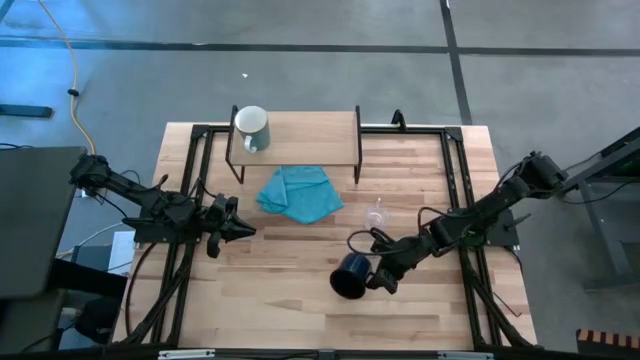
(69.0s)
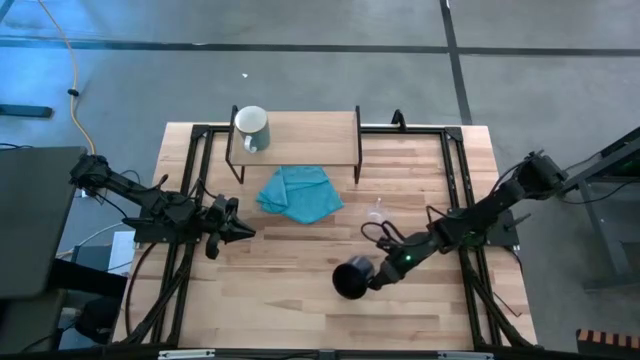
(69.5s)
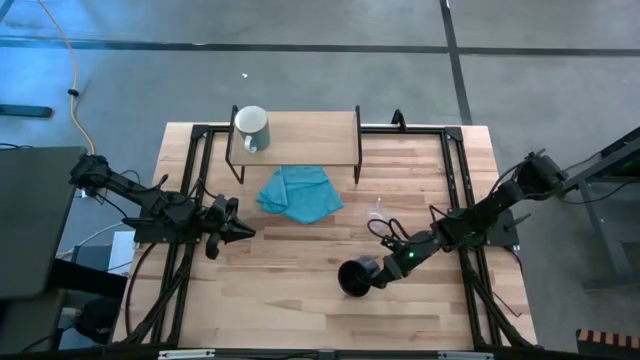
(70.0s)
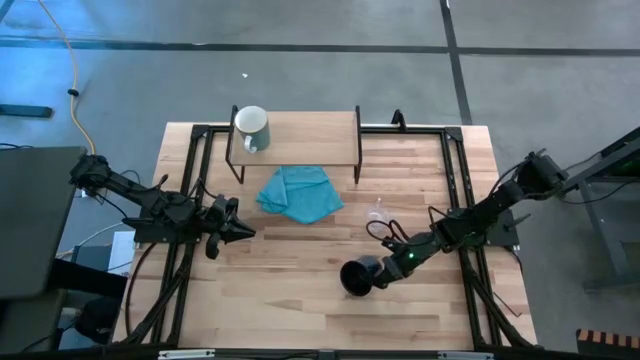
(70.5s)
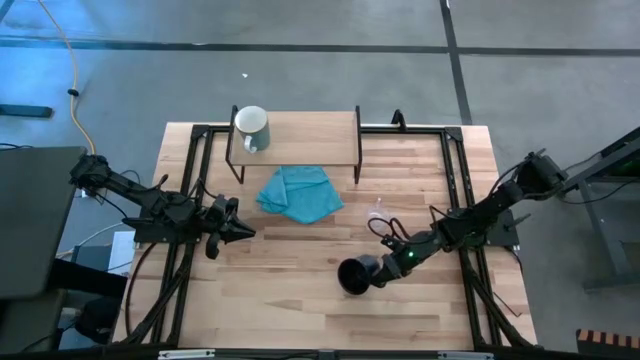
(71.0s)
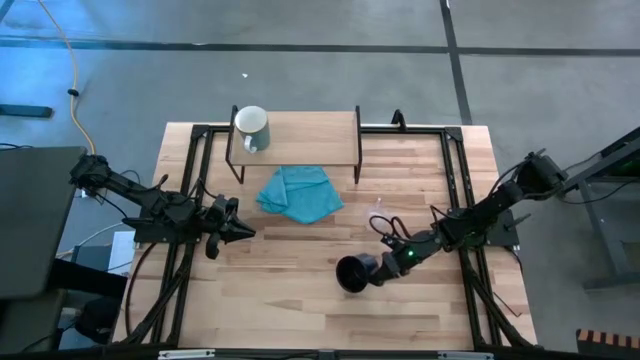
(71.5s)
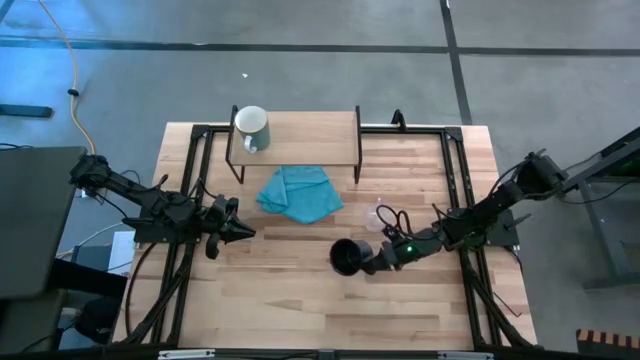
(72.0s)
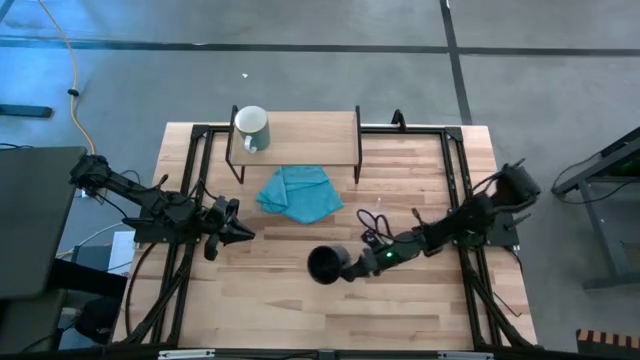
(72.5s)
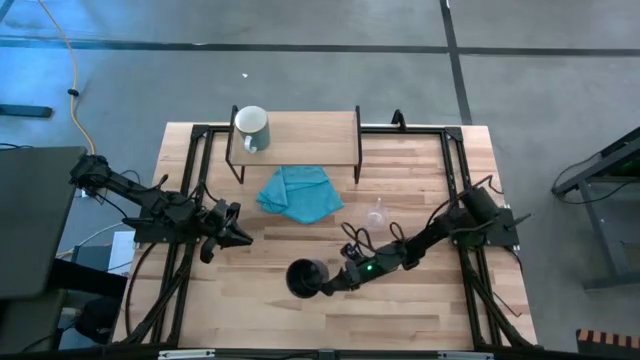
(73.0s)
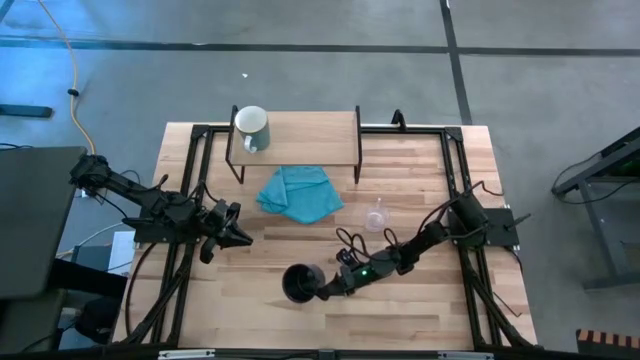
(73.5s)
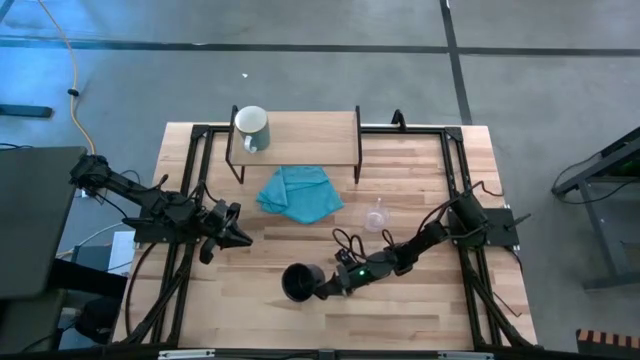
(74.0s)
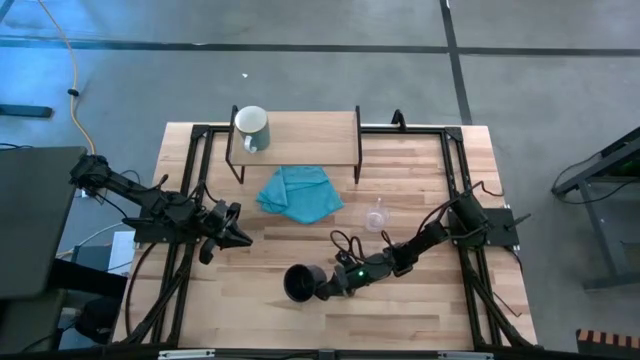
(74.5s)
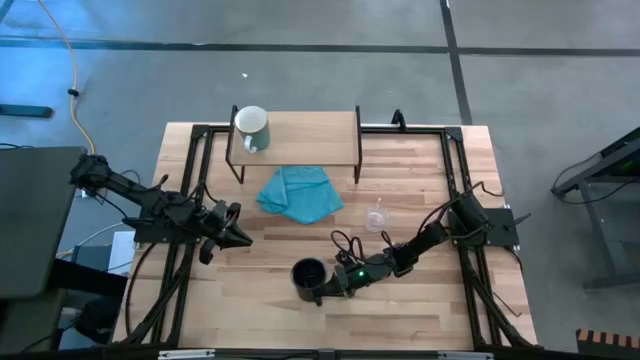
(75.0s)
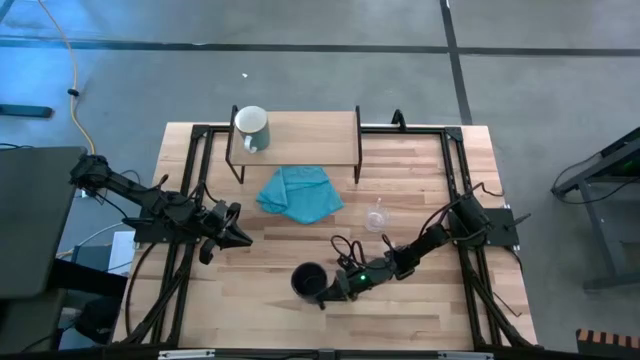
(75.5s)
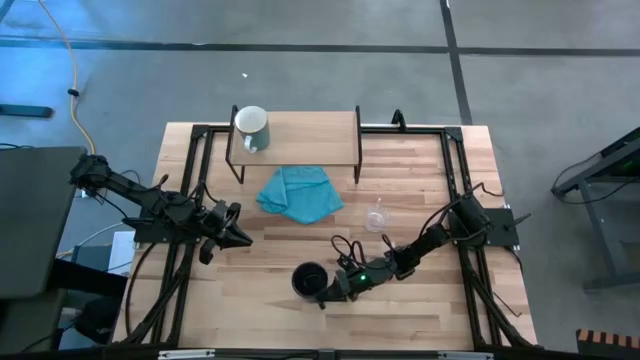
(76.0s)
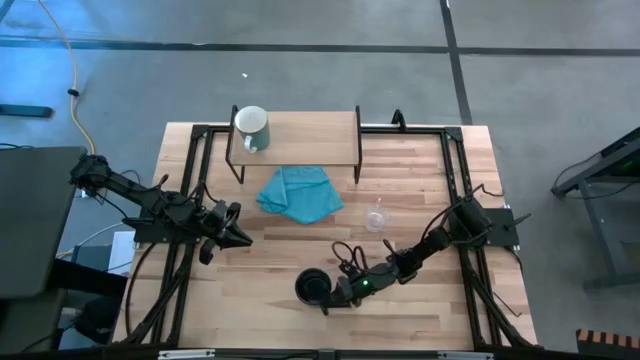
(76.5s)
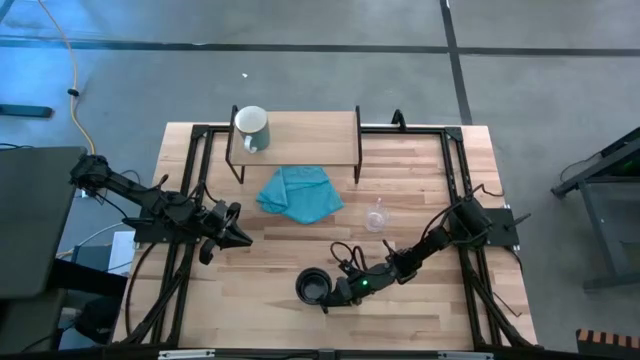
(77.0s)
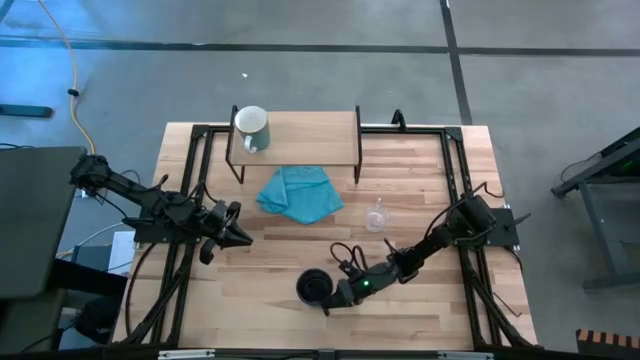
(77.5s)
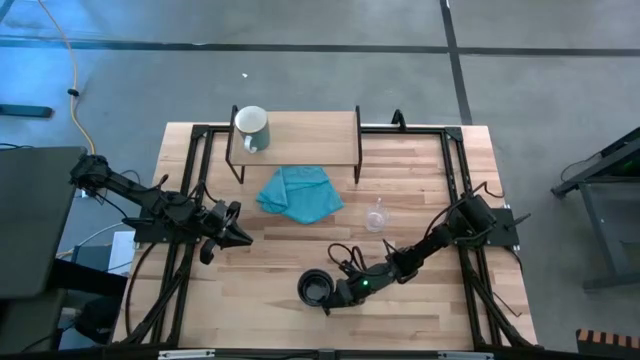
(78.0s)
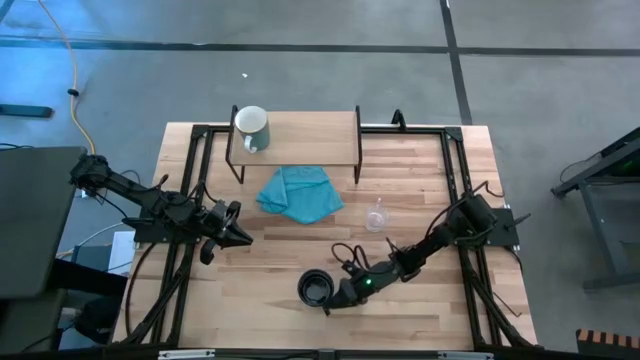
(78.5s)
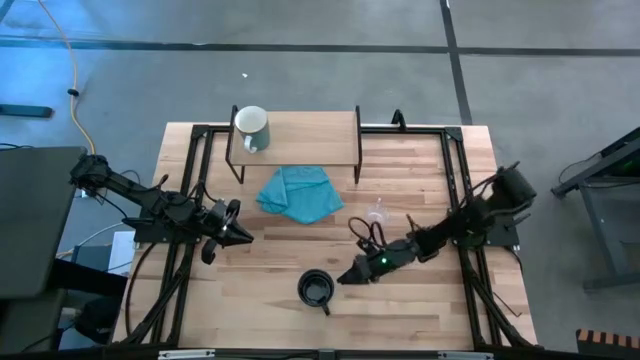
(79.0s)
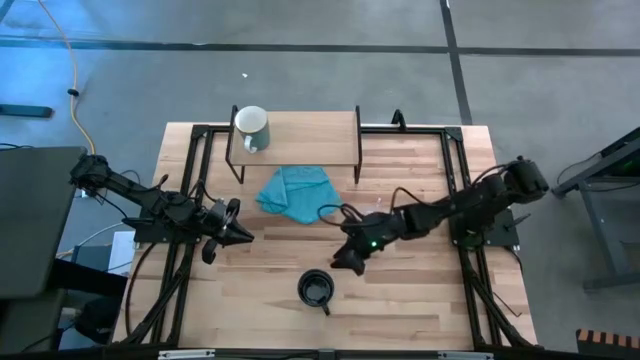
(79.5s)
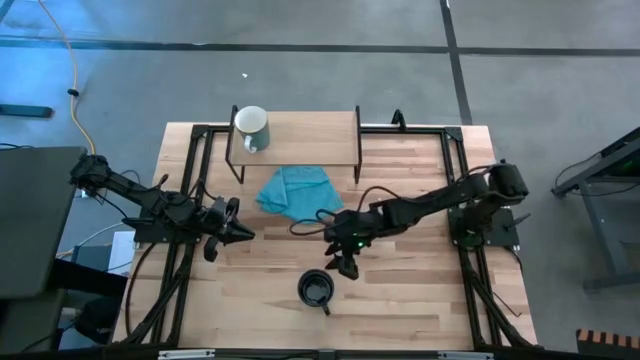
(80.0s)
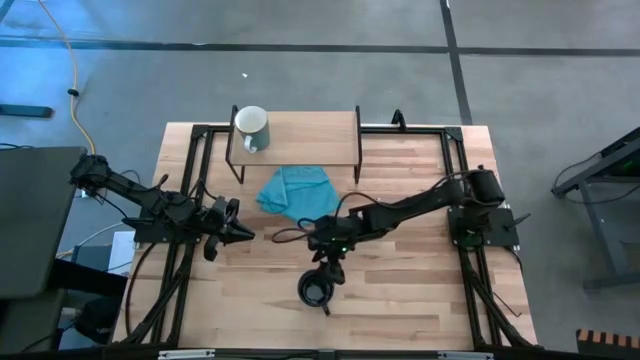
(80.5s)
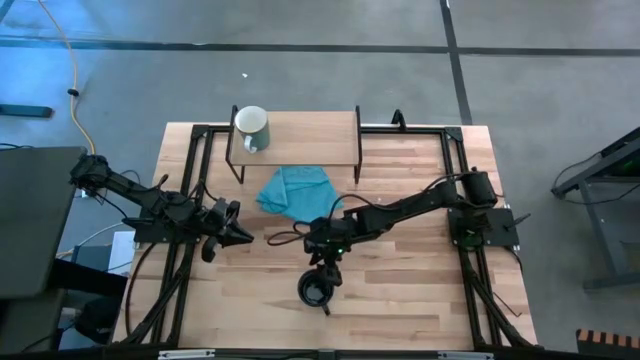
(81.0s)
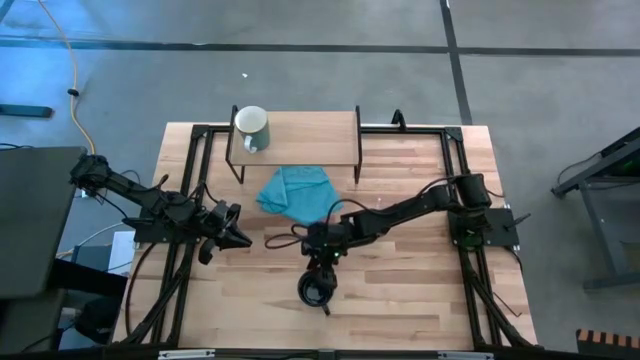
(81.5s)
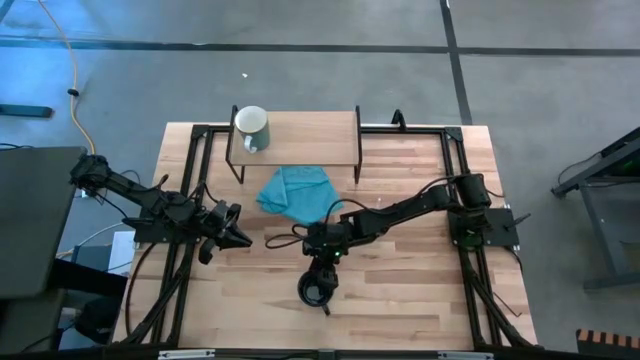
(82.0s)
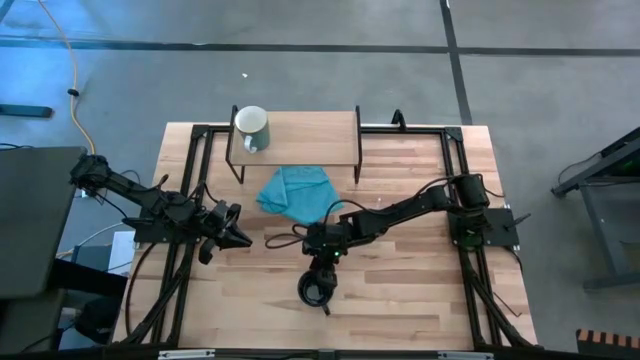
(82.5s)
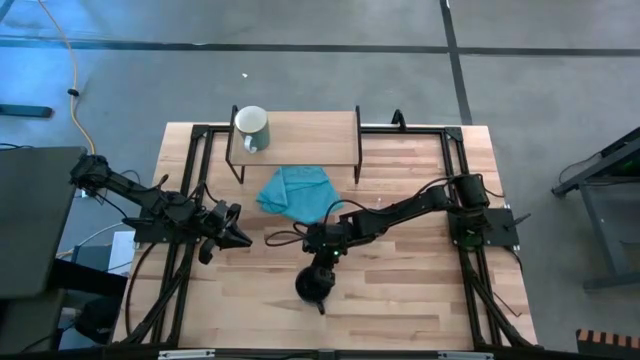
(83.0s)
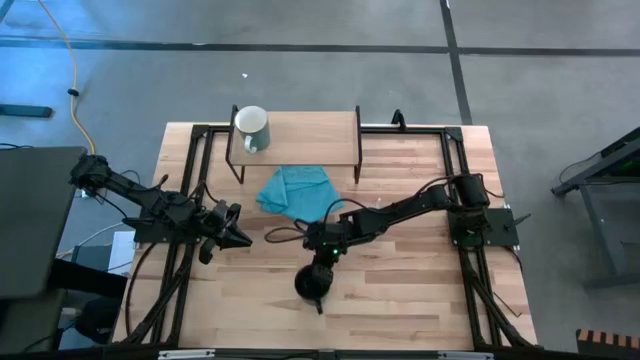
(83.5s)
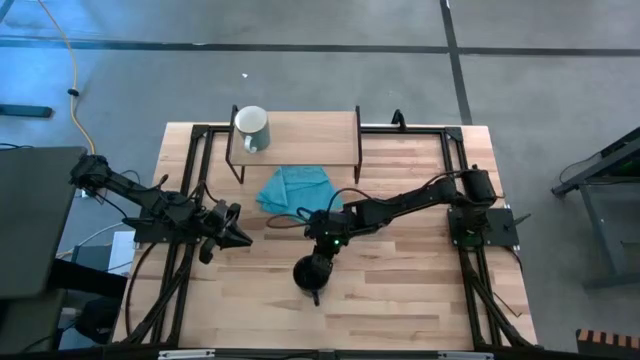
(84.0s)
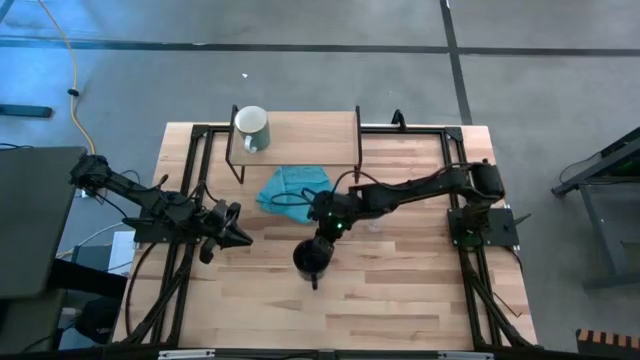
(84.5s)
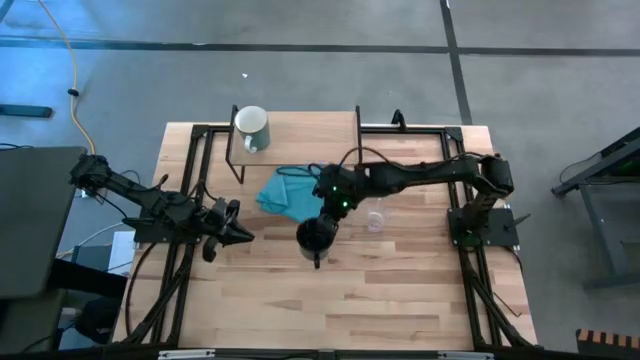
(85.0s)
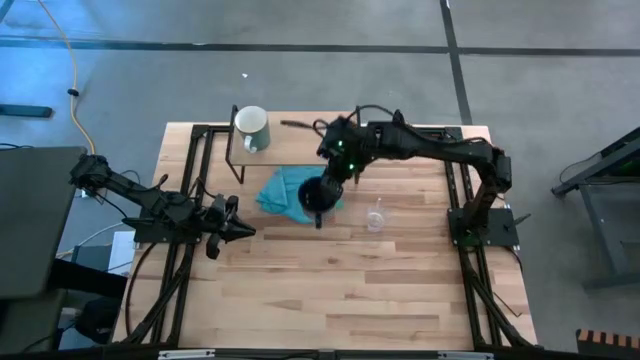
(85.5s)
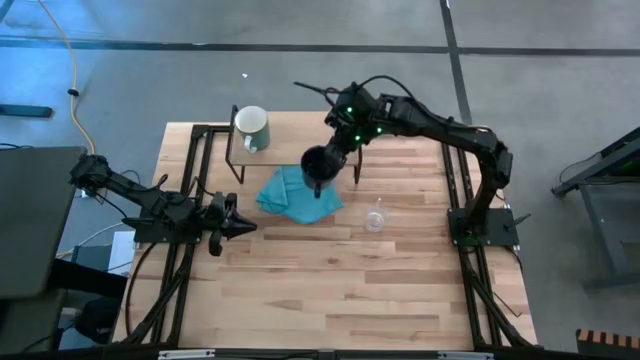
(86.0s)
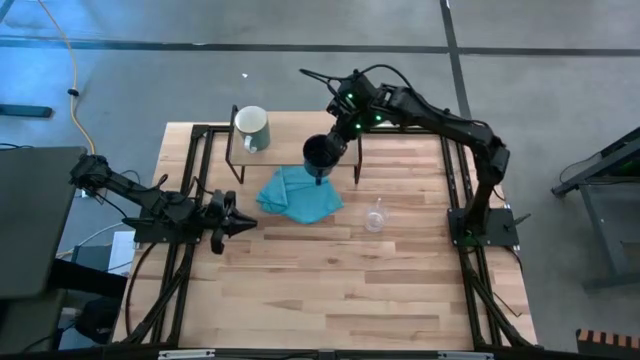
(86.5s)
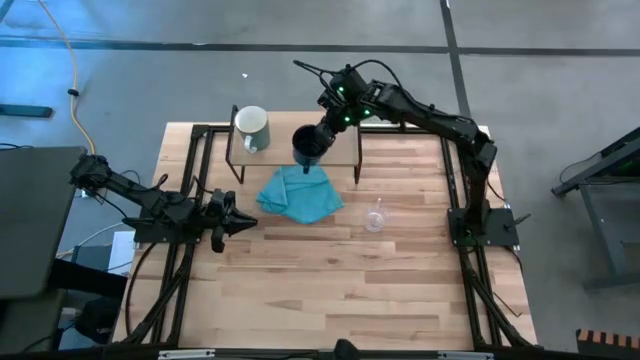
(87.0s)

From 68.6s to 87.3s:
Task: Stack small to large cups/mugs on shelf
Put the blue mug on the shelf

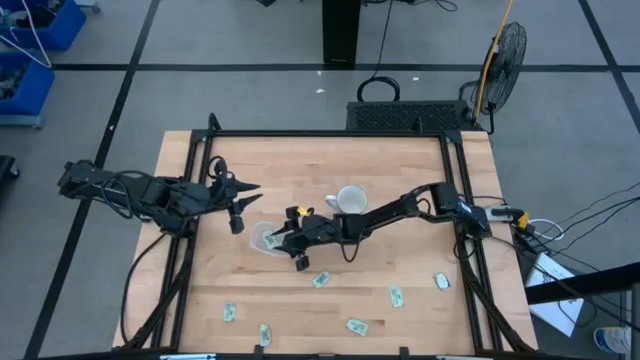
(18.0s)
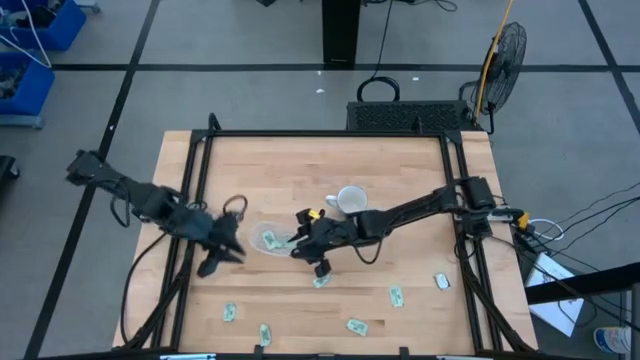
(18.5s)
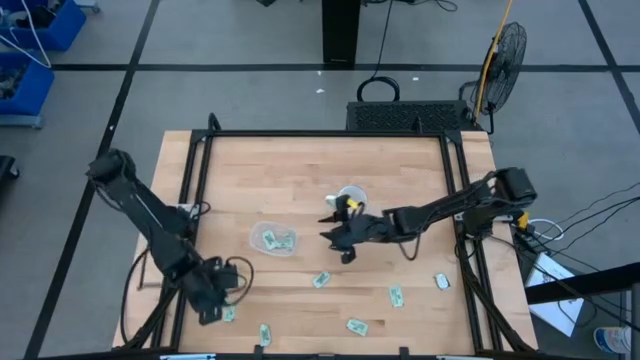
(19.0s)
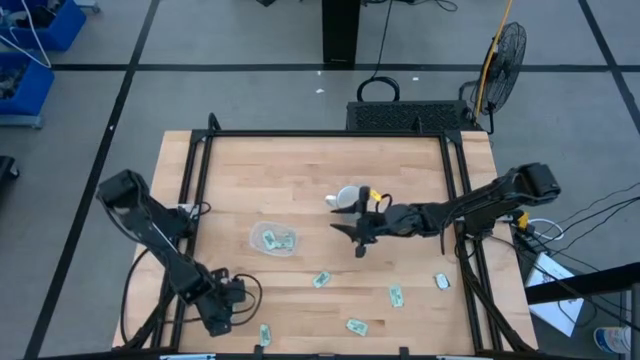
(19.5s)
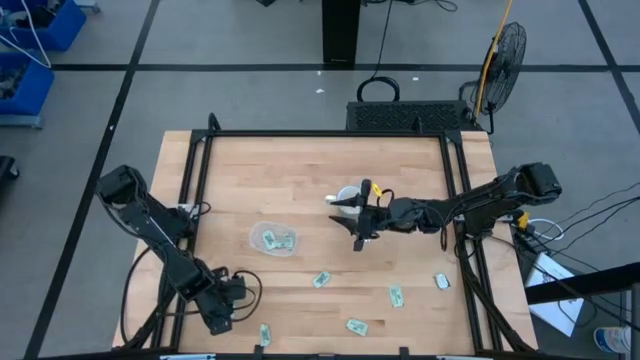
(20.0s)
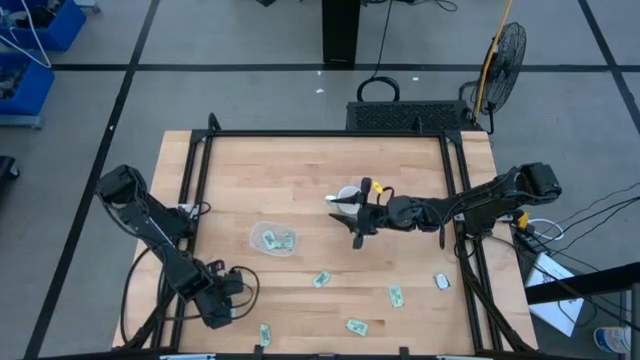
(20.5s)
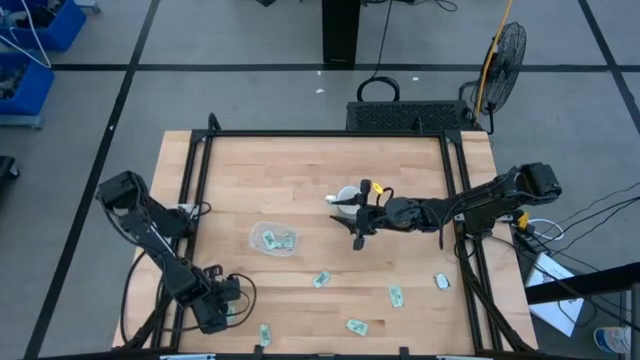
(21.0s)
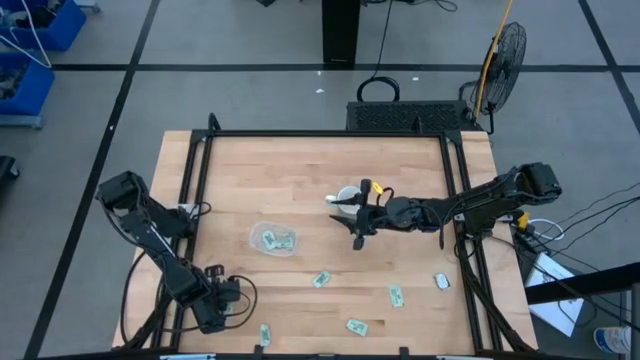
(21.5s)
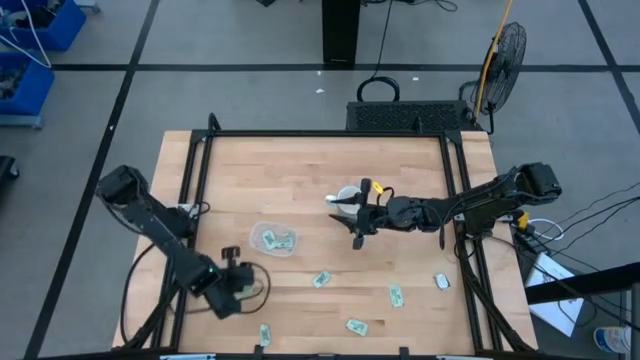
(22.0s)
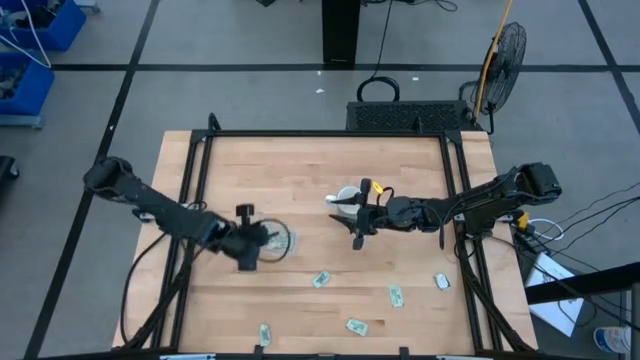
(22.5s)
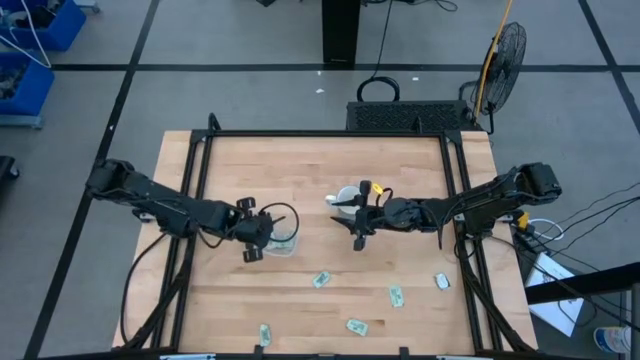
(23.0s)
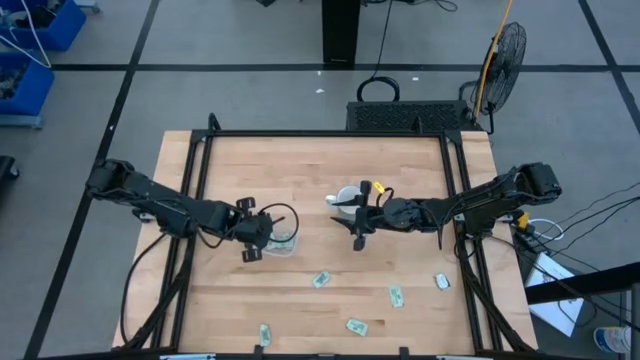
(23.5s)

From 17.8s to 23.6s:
Task: Pick and place Stevia / Truvia into bins
Put the green stevia packet into the transparent bin
